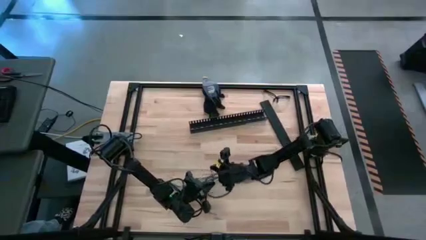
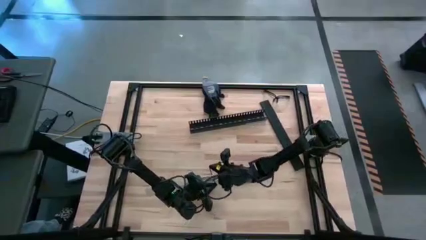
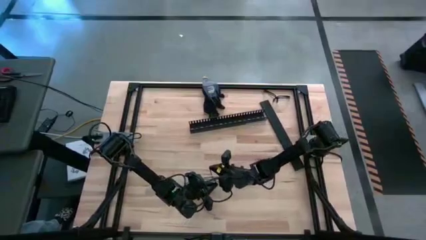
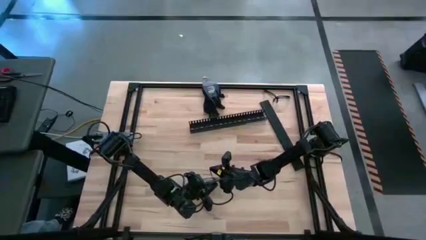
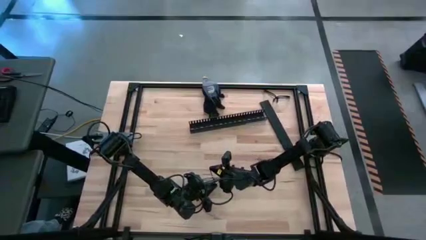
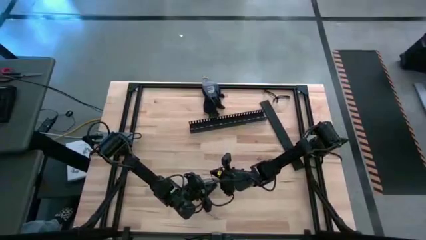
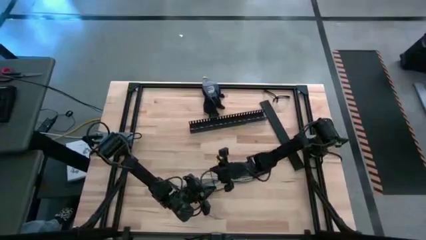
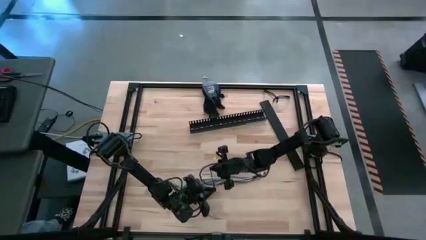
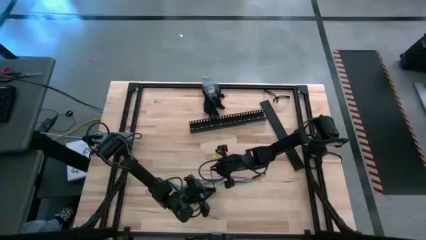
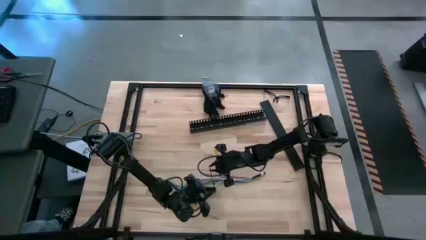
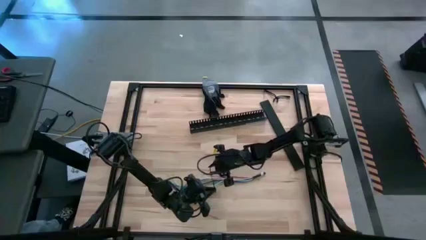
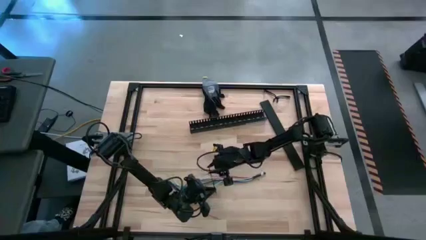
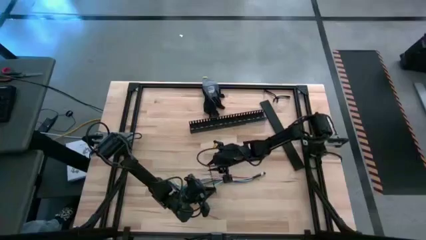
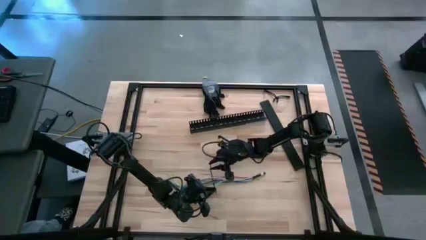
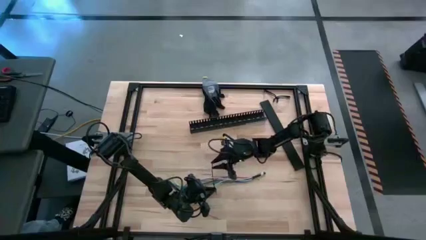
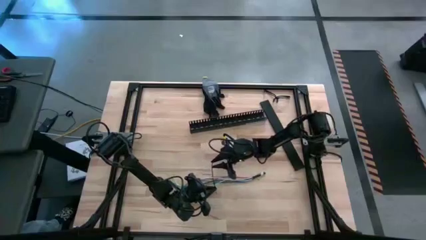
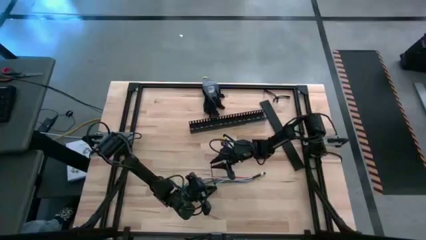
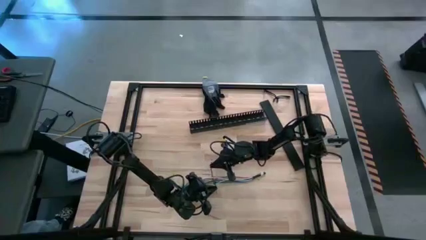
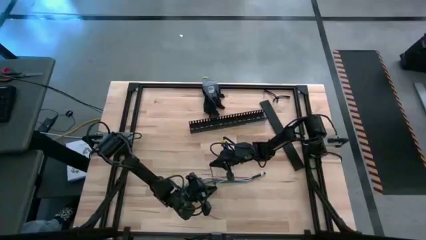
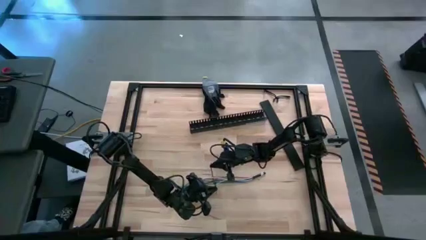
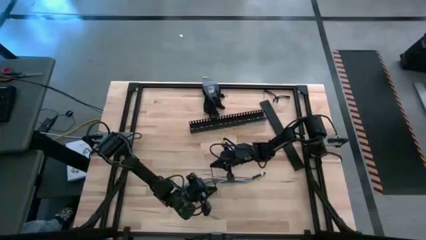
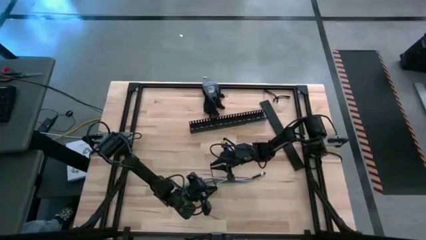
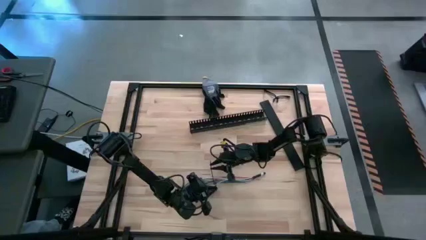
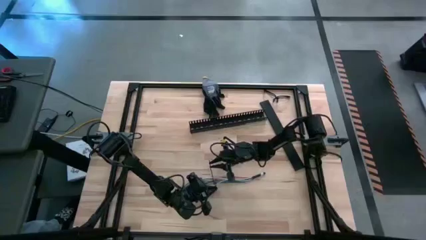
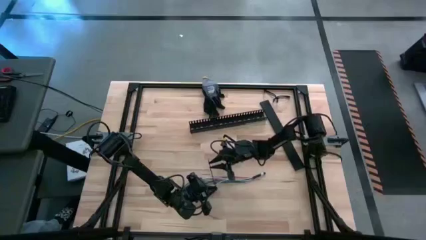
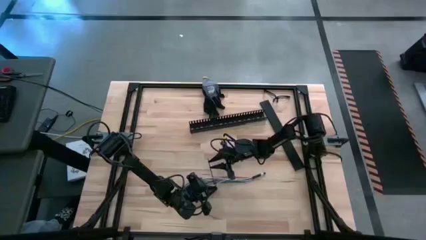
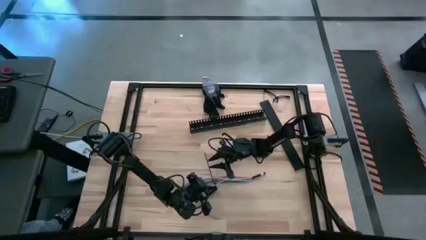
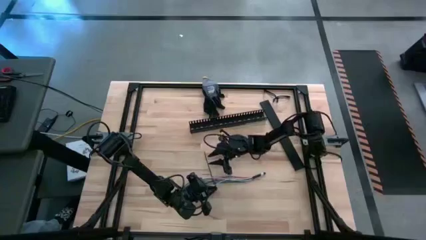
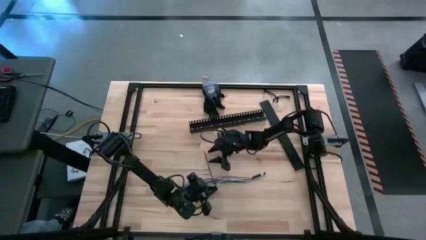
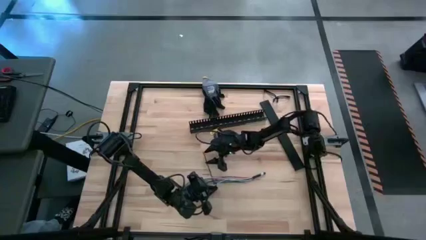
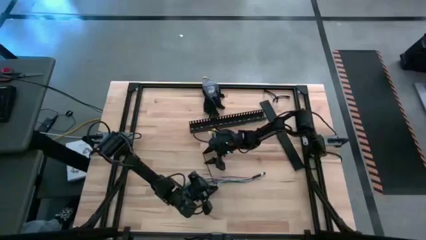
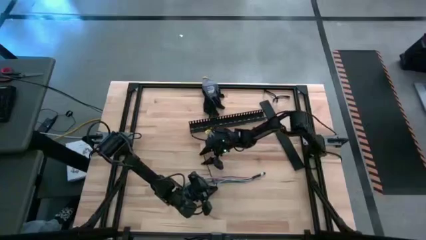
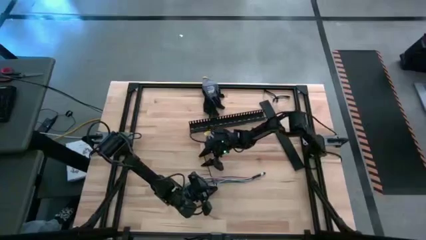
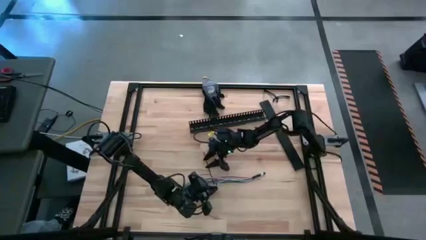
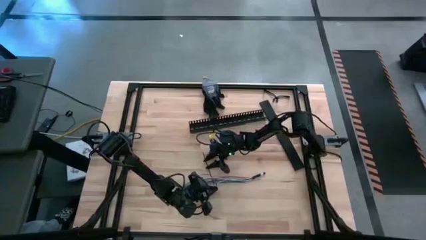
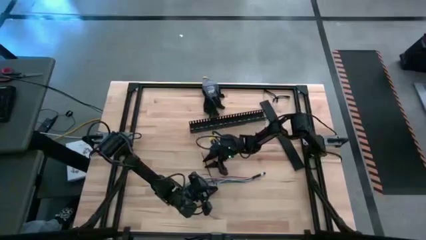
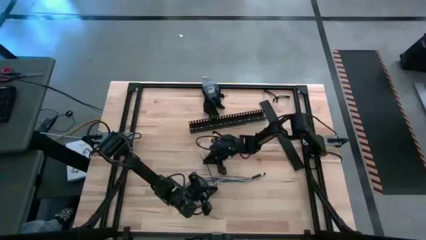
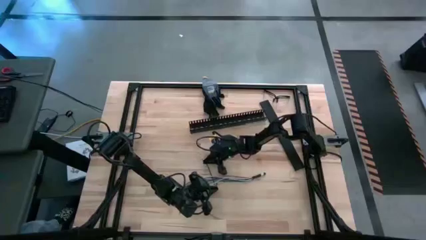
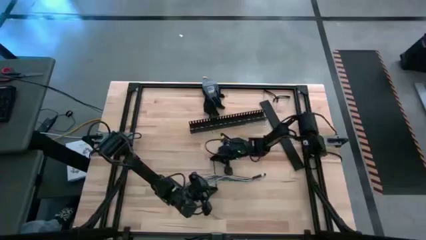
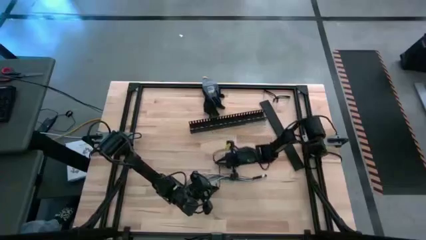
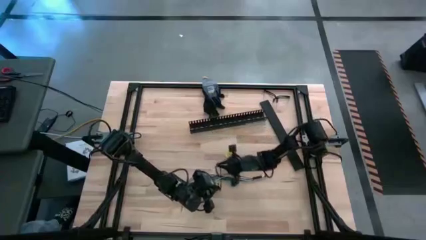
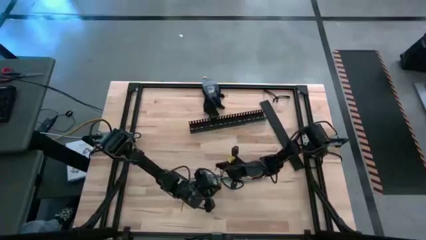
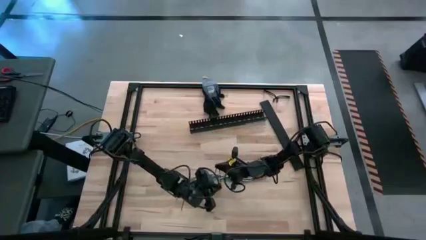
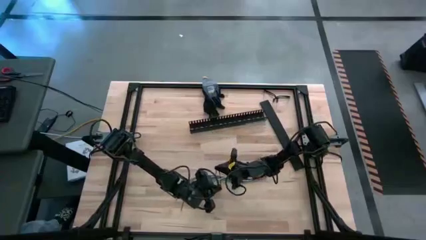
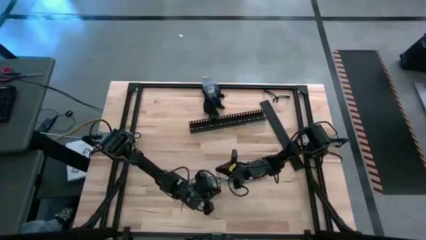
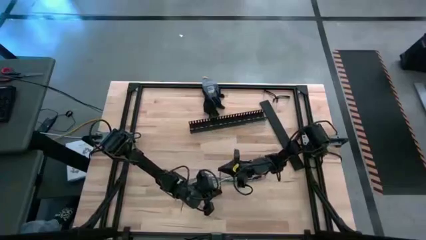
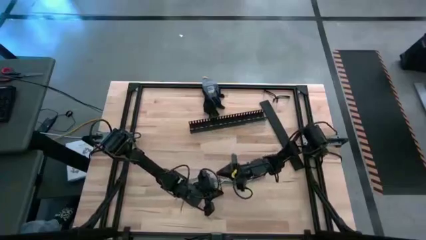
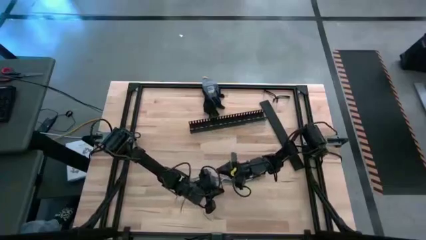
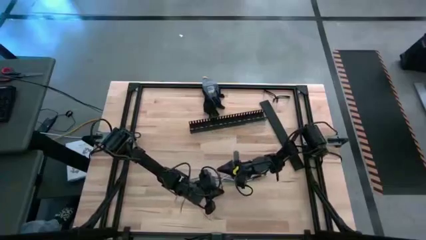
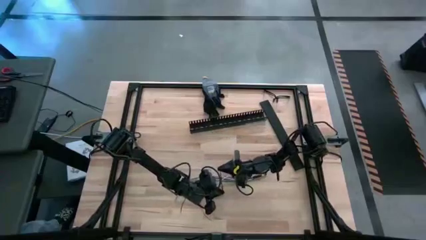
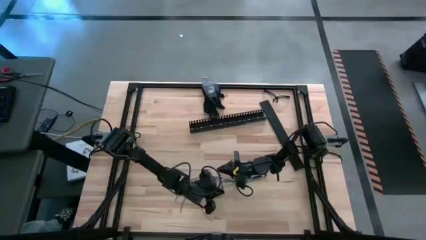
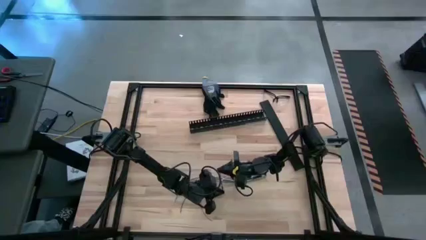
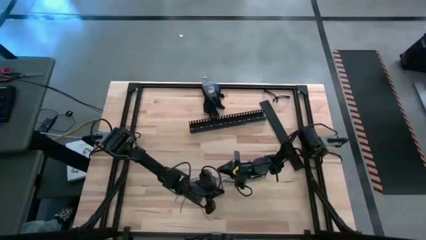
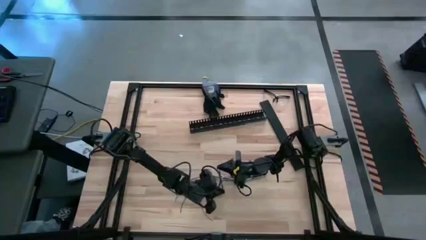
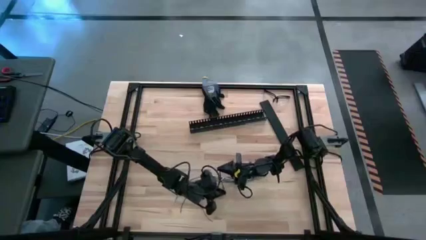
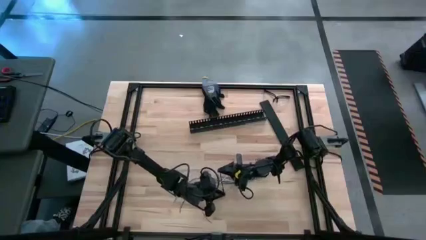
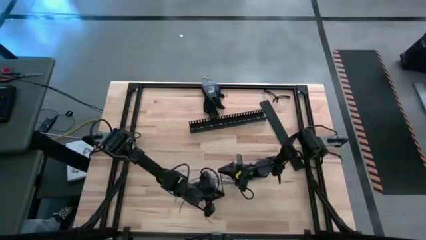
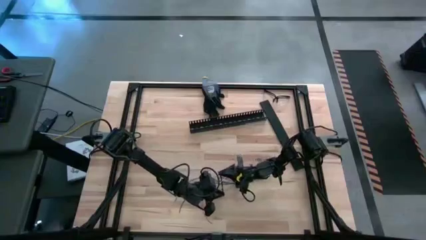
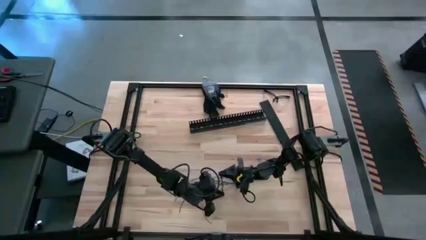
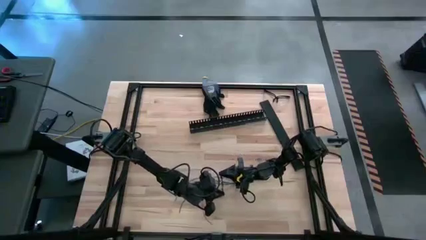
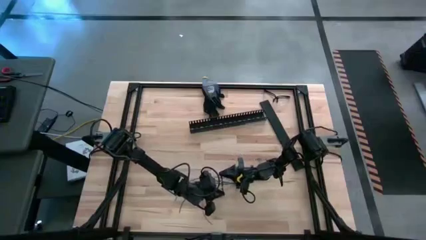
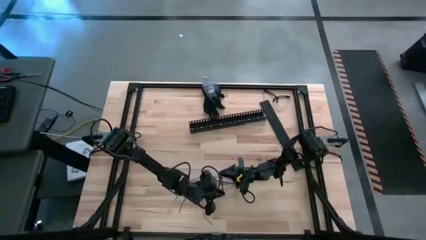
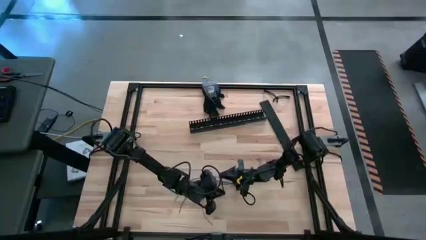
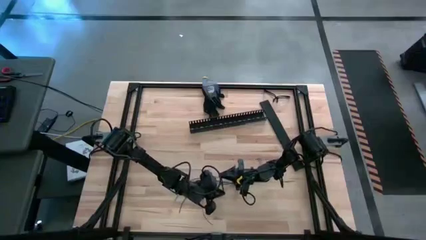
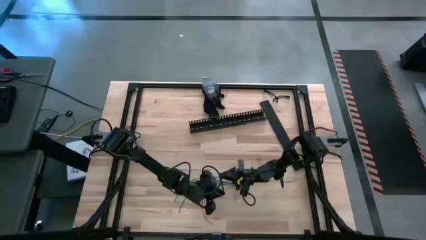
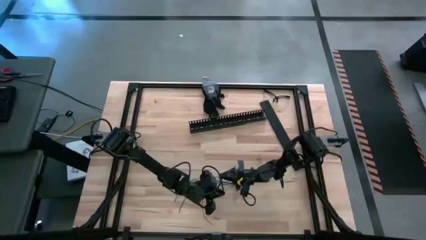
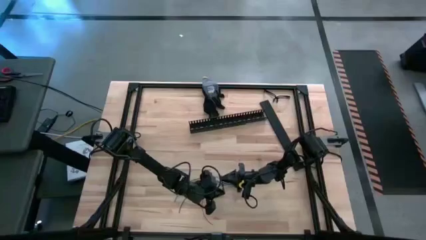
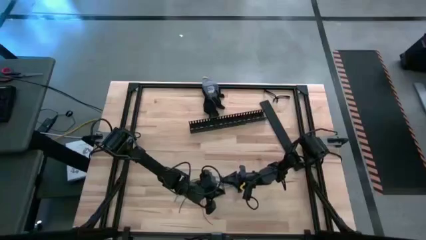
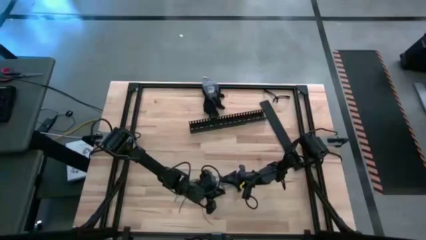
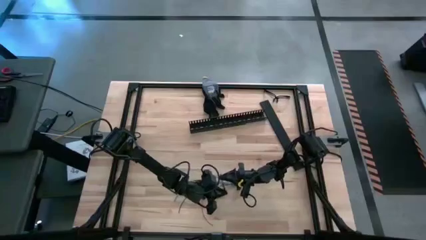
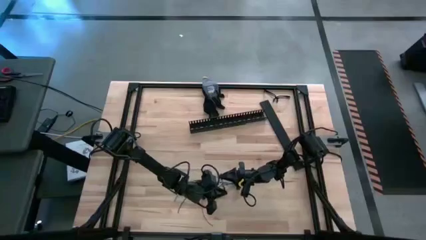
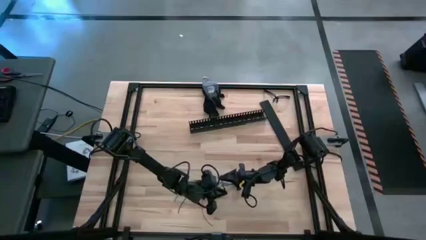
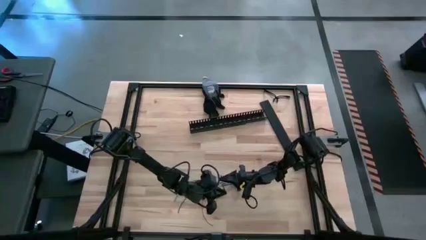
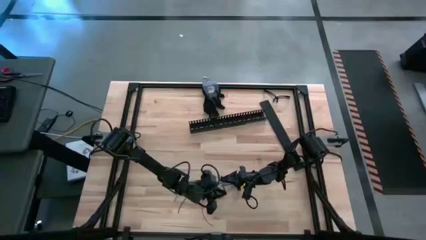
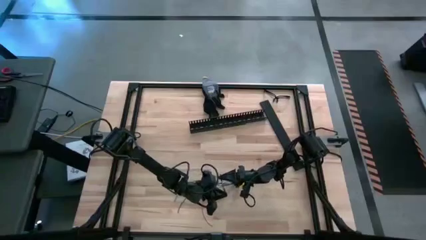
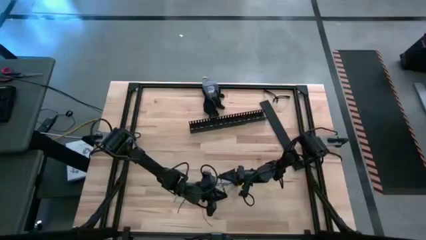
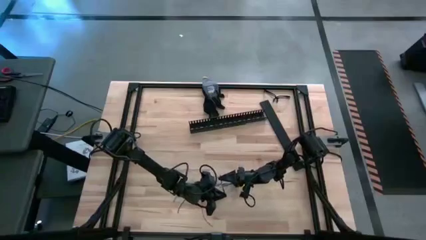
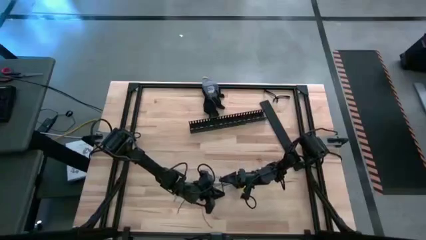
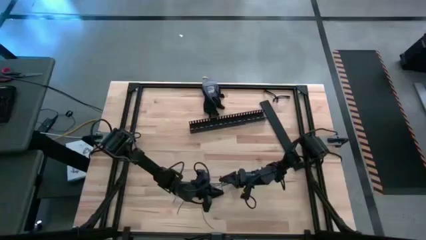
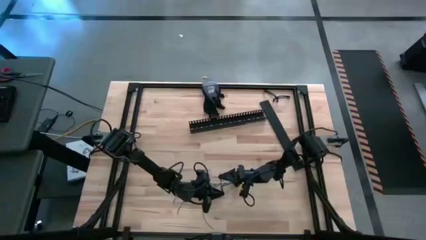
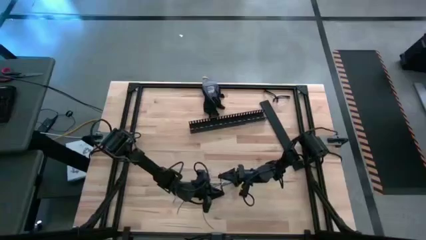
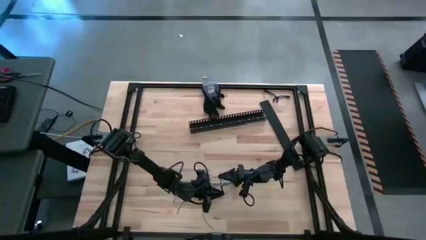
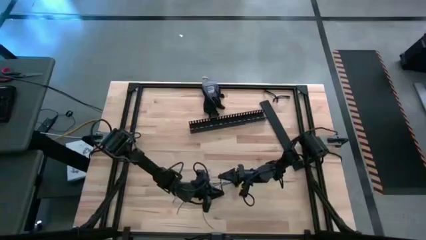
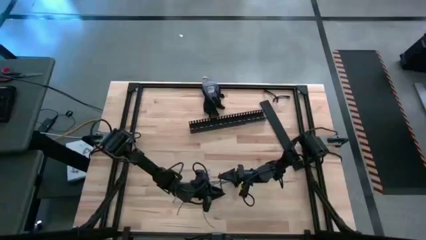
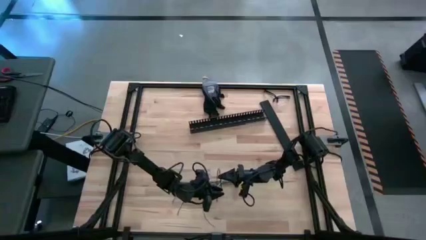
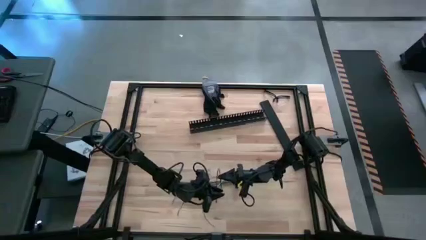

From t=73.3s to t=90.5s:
Task: Ziptie cables
Wrap the colored loose cables with the black zip tie
